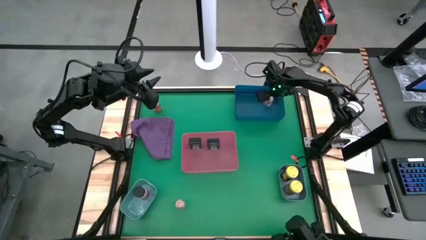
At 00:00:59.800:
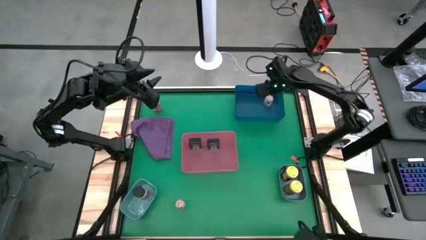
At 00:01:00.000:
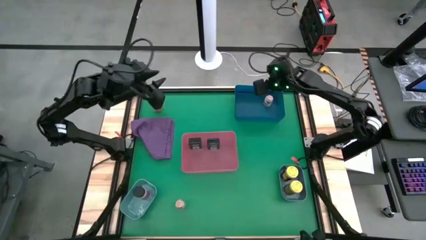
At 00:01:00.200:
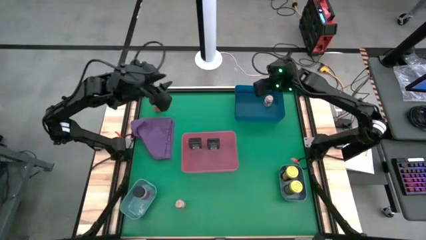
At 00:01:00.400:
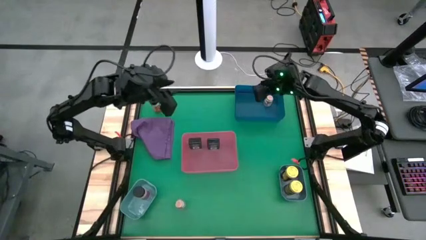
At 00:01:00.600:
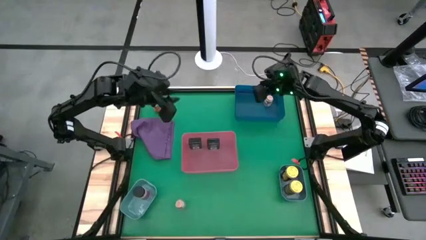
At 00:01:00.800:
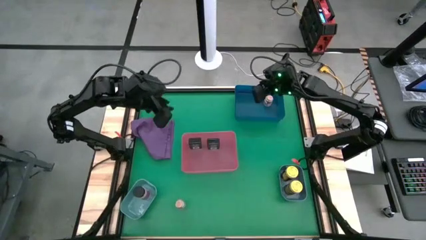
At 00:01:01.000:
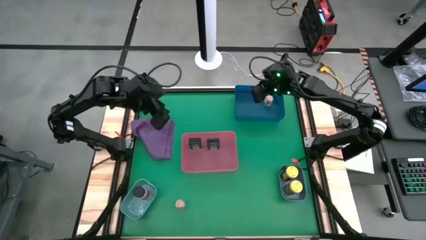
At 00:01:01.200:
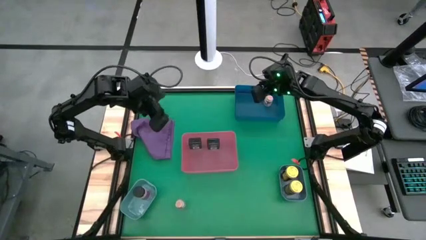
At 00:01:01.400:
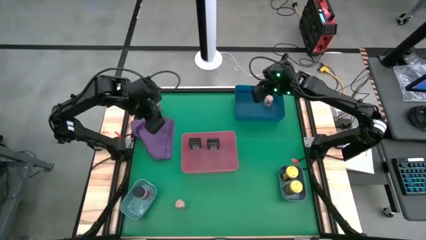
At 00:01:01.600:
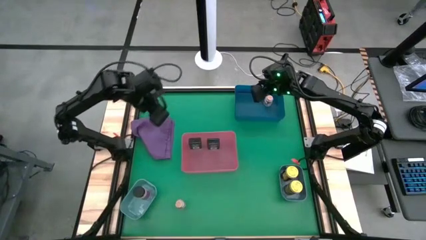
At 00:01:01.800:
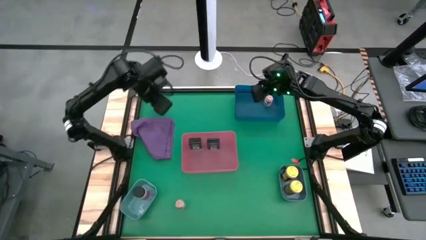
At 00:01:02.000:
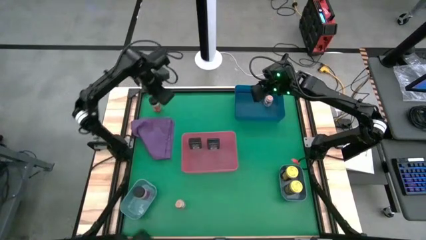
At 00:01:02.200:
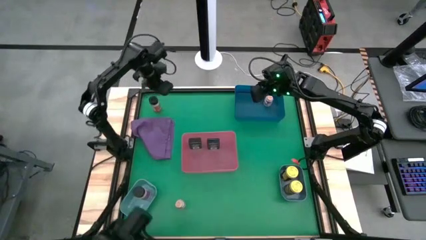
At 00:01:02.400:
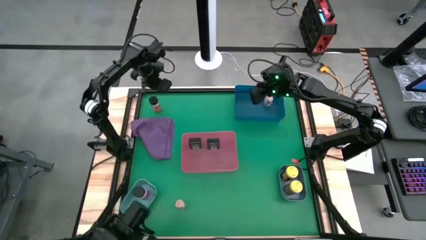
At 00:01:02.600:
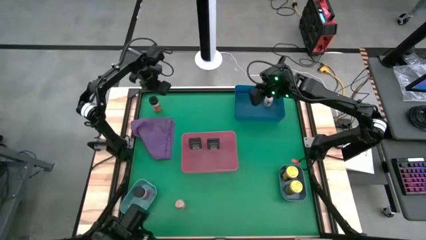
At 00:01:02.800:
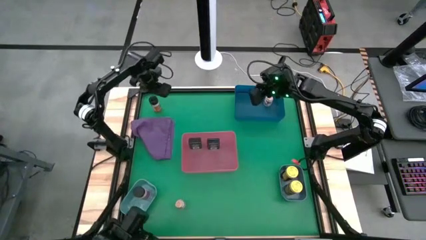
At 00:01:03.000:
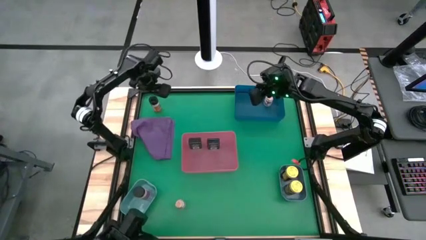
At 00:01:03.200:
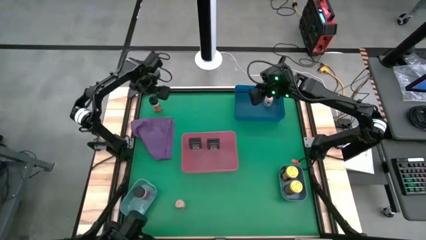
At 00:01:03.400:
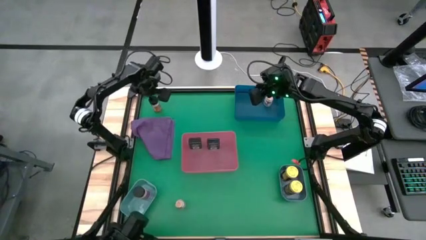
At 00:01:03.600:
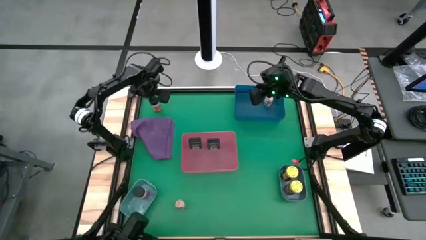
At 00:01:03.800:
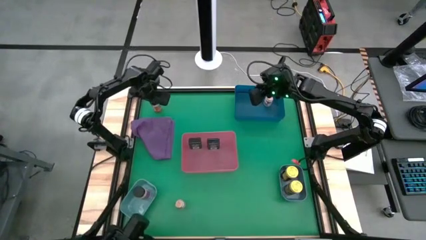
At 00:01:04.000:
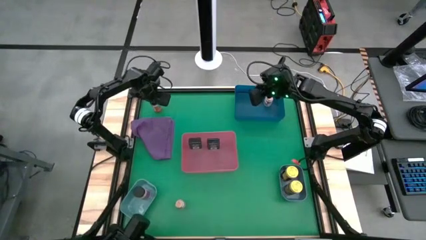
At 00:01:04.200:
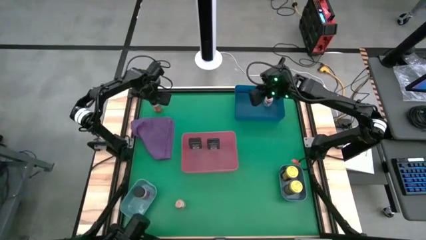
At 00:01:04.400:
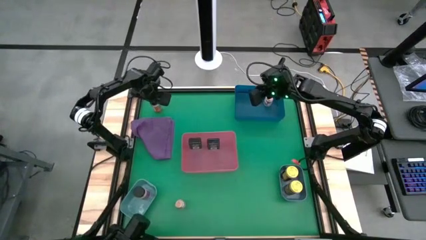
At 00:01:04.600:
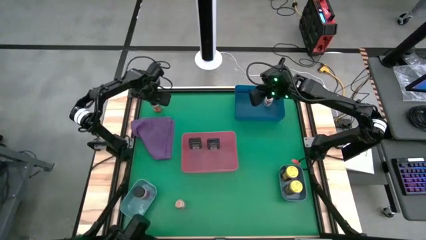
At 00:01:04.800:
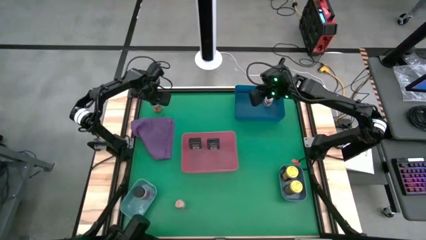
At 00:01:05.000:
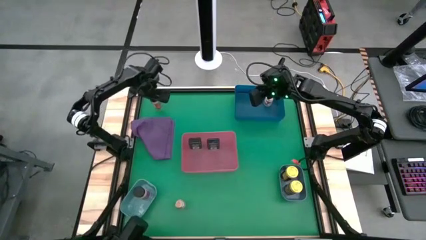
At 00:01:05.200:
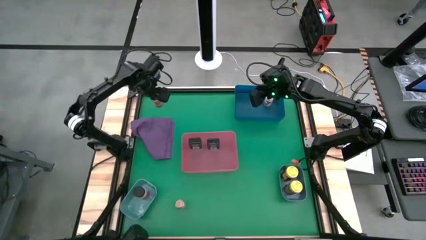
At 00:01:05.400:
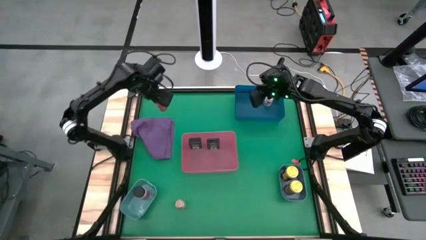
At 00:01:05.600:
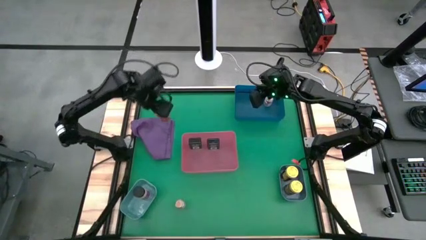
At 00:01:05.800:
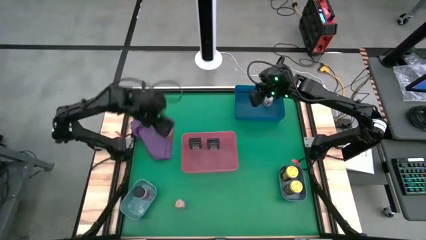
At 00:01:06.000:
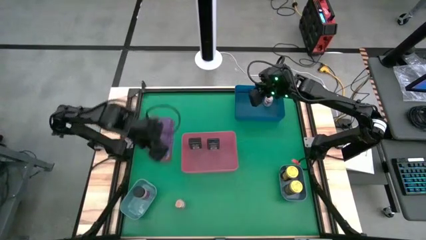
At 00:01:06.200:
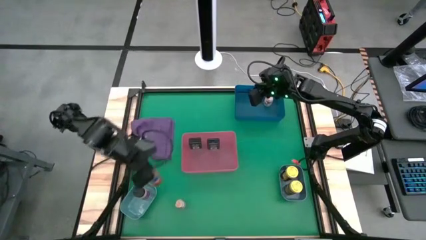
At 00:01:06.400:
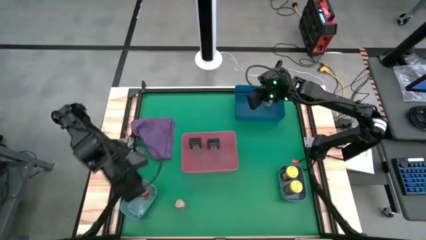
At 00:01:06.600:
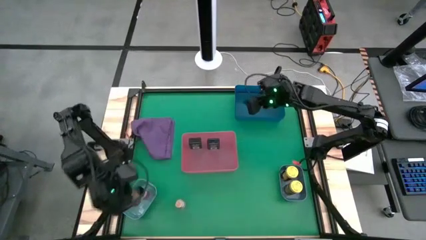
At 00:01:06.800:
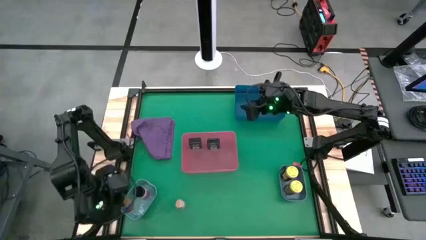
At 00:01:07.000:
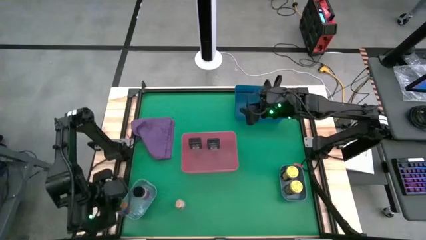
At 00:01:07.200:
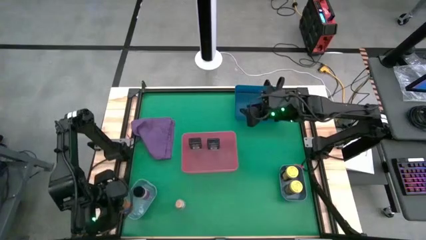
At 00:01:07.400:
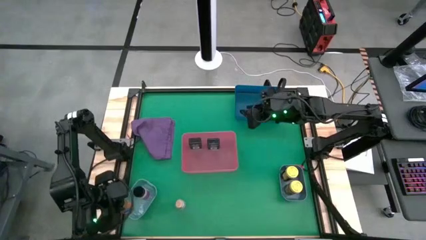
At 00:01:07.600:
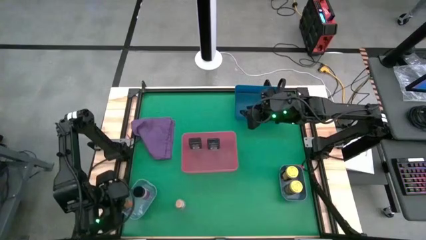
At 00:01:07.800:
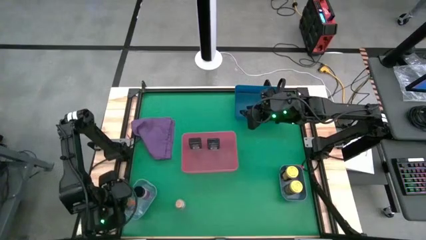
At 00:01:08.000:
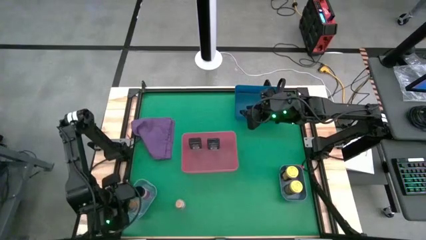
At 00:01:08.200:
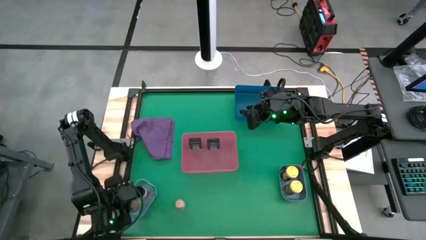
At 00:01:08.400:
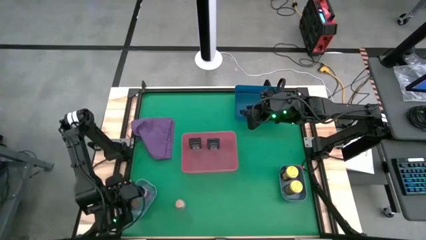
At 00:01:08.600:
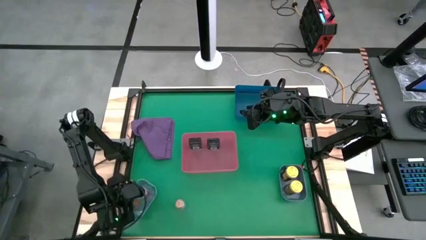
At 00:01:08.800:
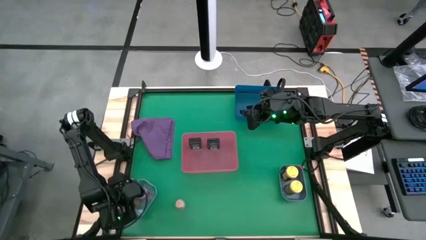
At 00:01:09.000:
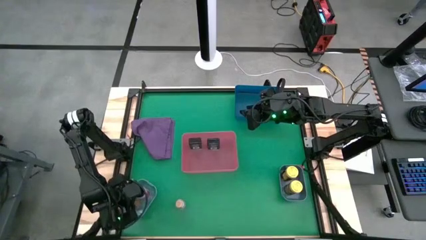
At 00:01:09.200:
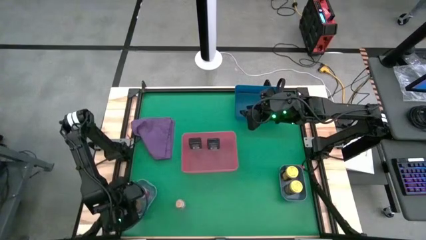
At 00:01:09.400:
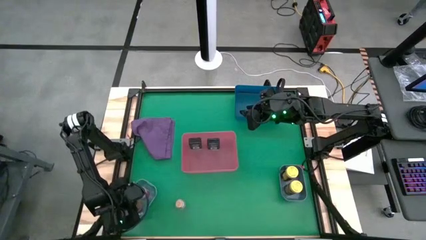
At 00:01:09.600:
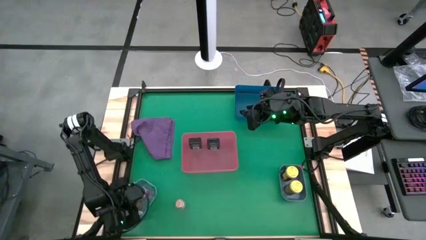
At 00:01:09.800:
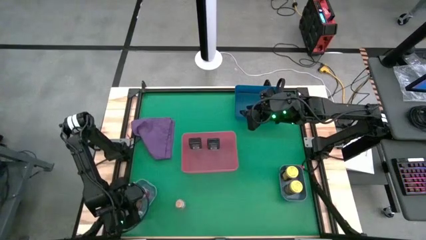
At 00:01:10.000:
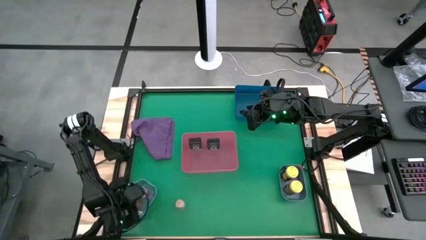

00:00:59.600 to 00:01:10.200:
Task: Sort spices by type
Put the black seasoning bottle into the light blue bin
